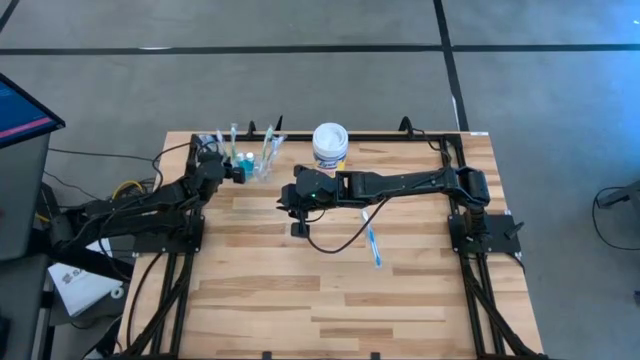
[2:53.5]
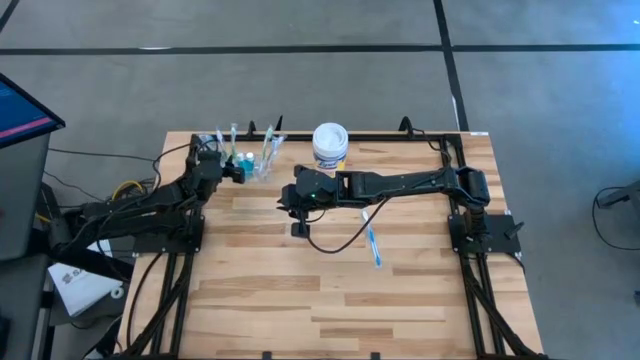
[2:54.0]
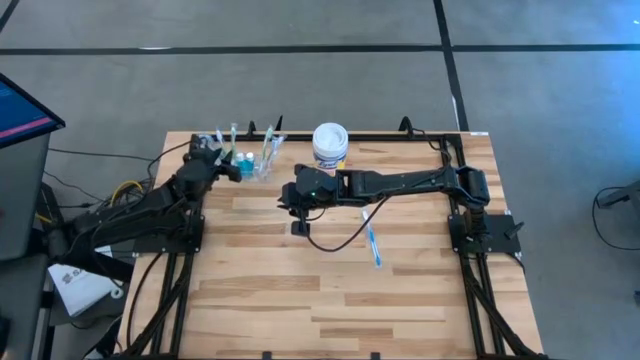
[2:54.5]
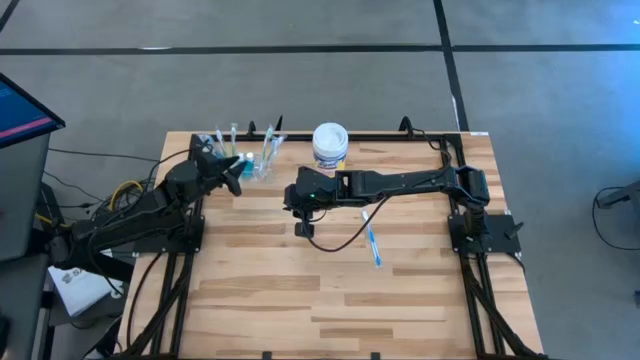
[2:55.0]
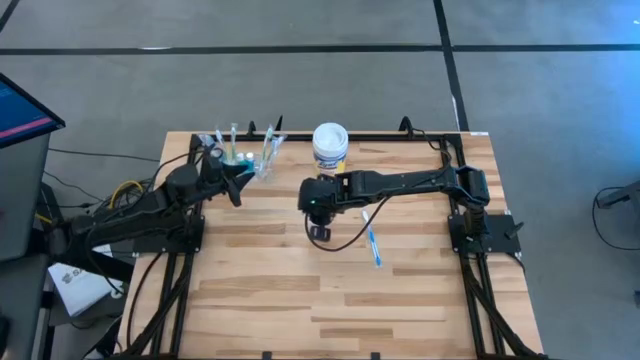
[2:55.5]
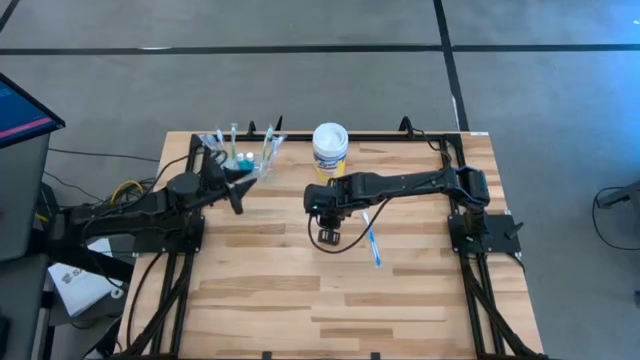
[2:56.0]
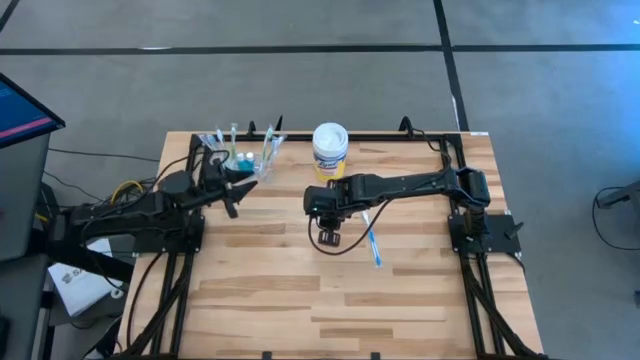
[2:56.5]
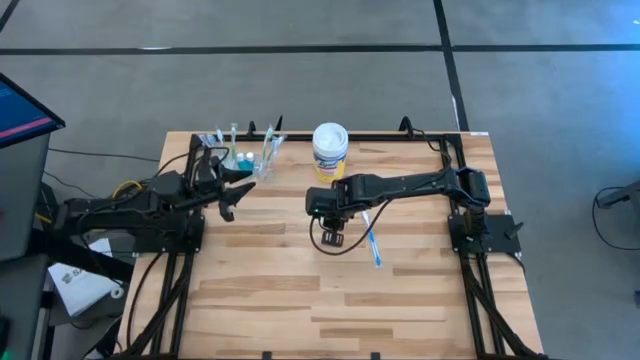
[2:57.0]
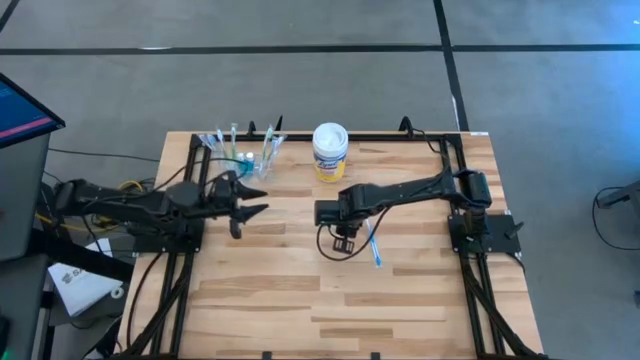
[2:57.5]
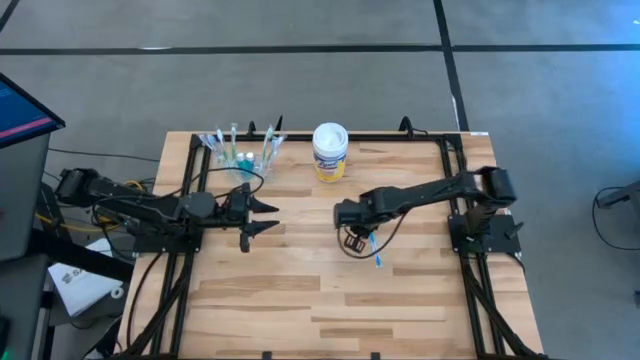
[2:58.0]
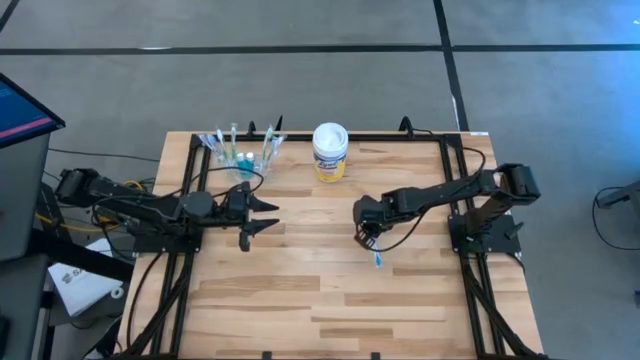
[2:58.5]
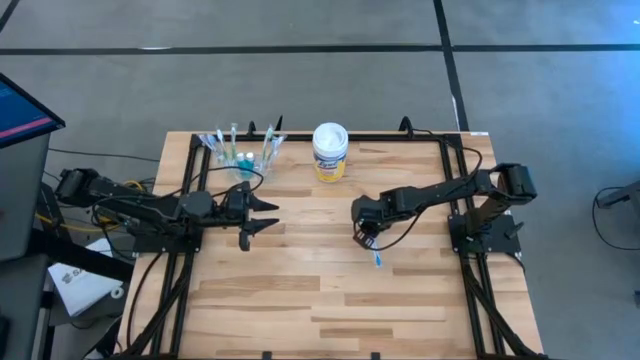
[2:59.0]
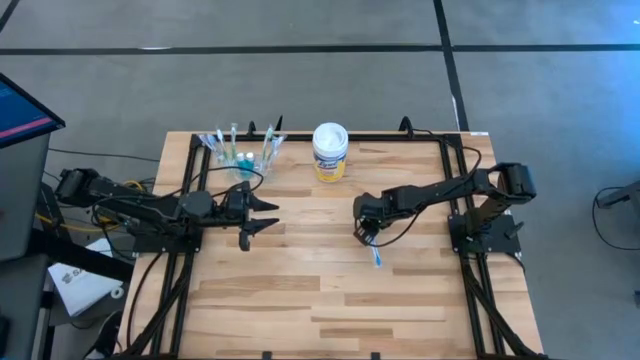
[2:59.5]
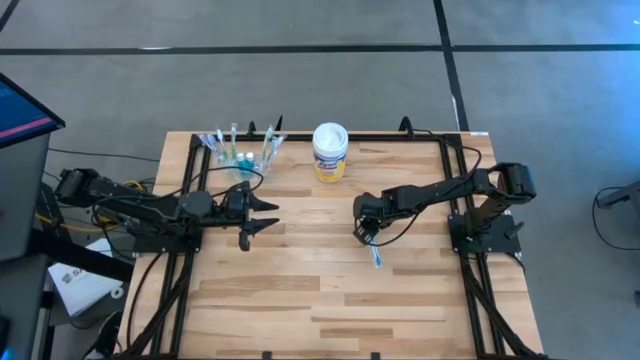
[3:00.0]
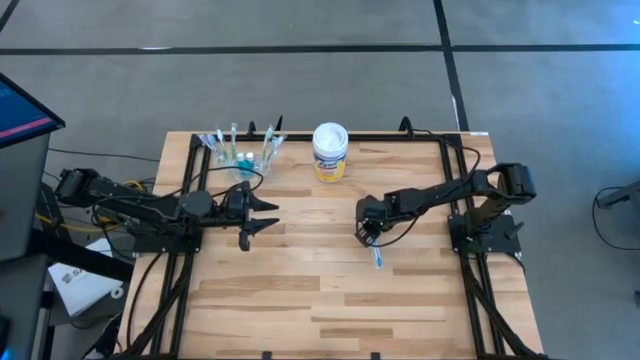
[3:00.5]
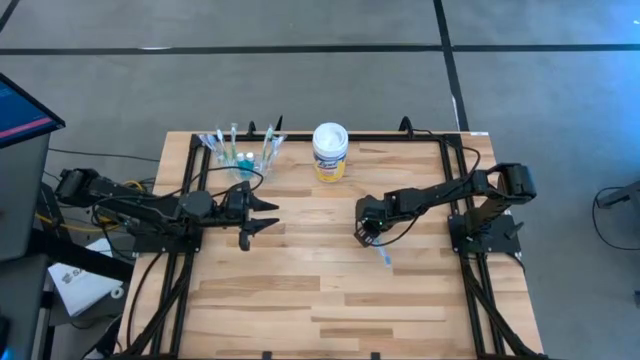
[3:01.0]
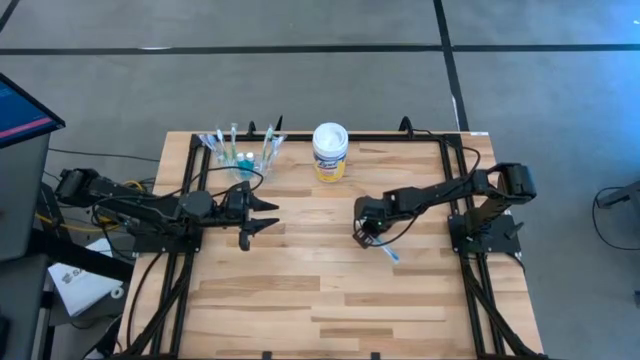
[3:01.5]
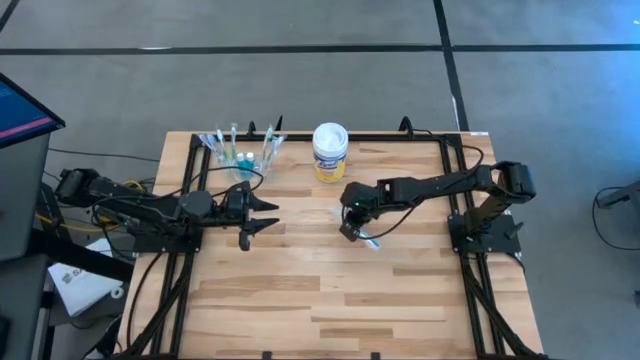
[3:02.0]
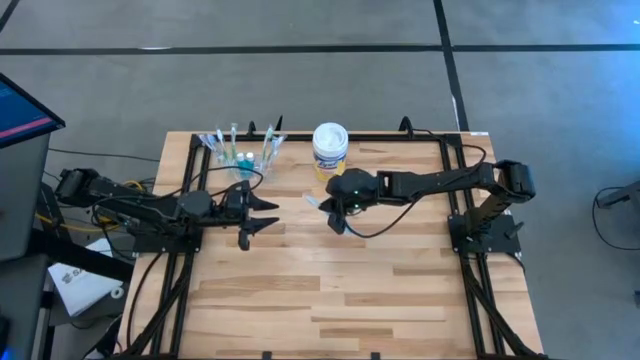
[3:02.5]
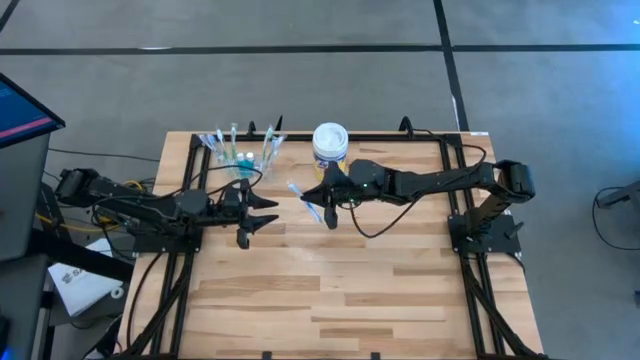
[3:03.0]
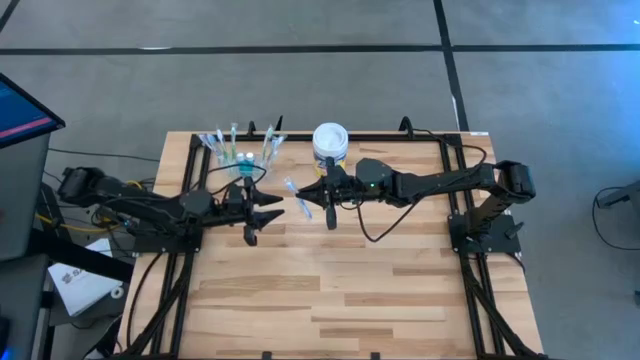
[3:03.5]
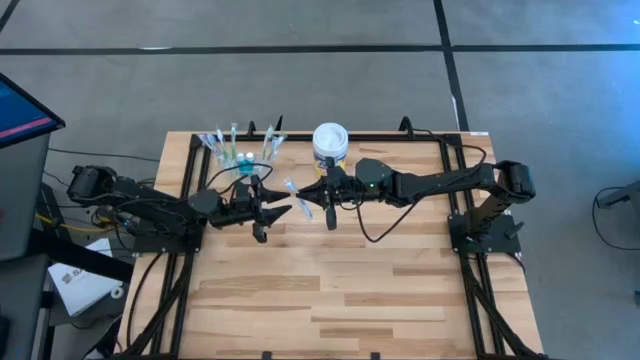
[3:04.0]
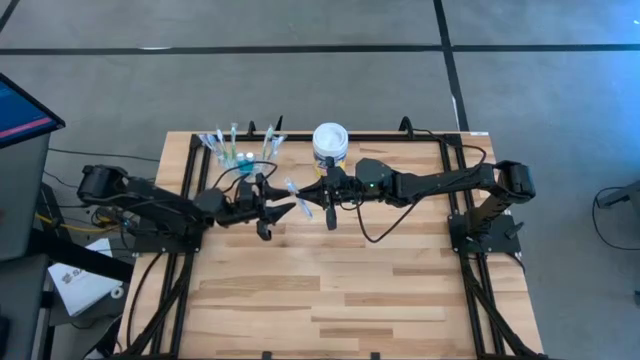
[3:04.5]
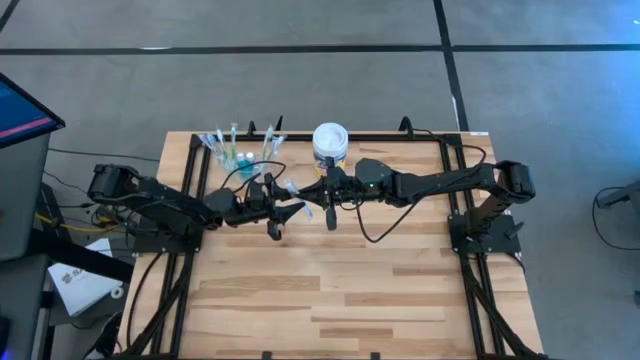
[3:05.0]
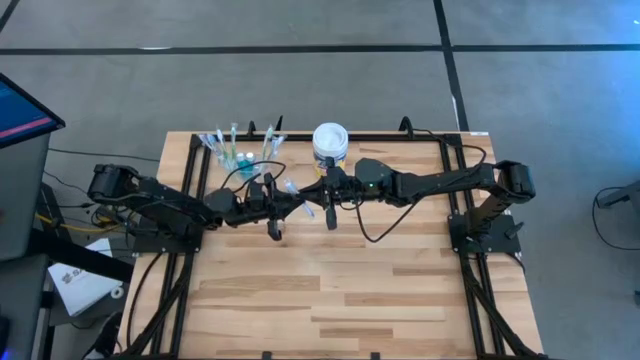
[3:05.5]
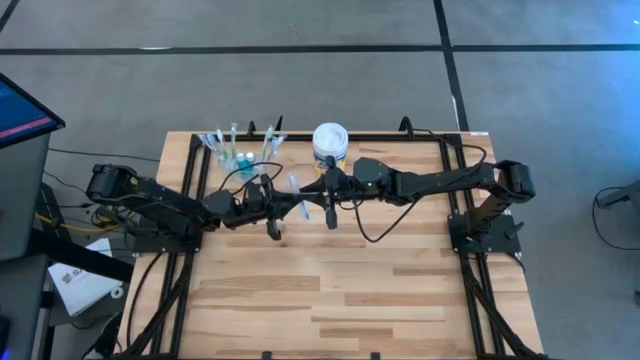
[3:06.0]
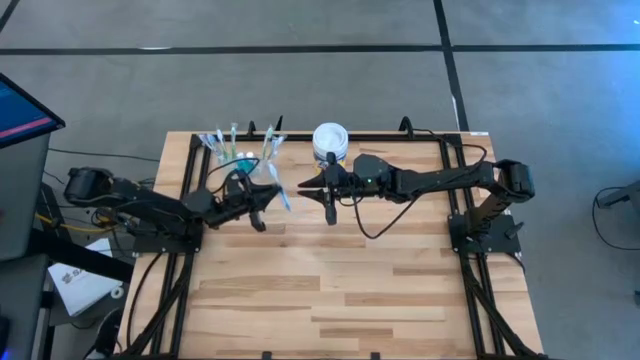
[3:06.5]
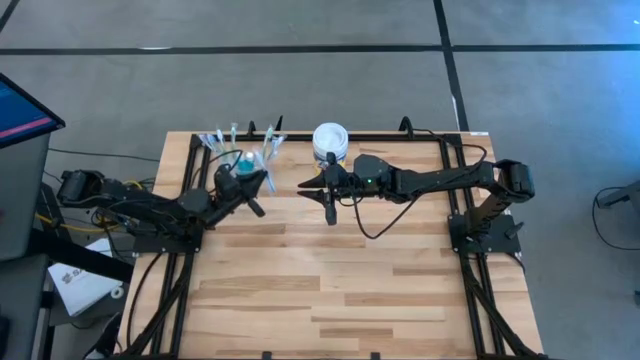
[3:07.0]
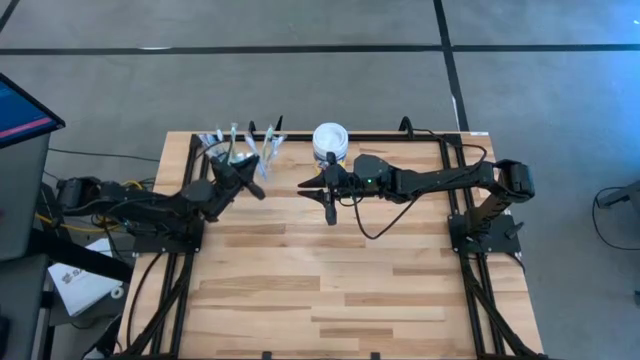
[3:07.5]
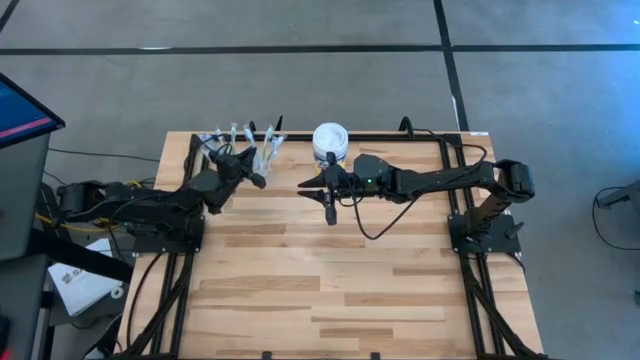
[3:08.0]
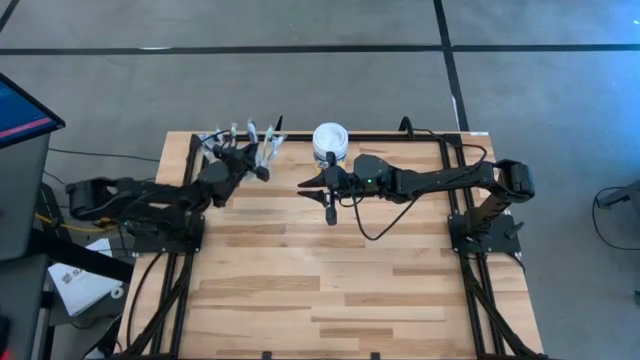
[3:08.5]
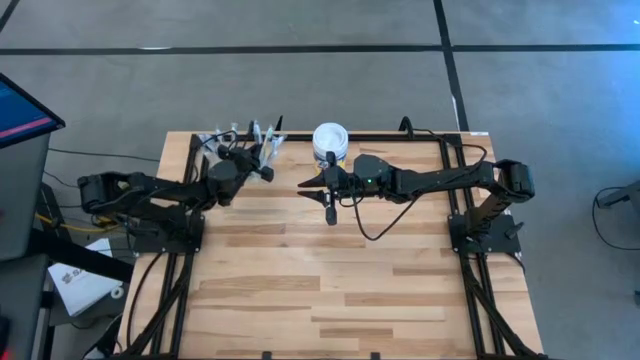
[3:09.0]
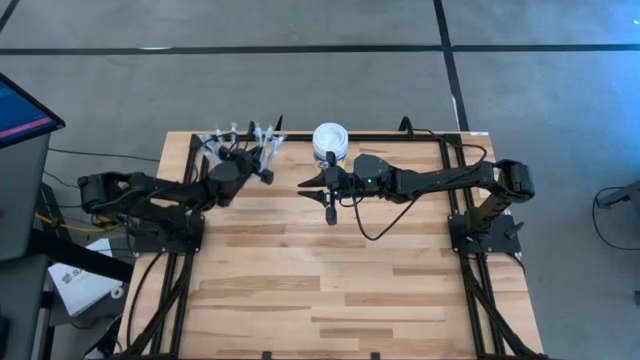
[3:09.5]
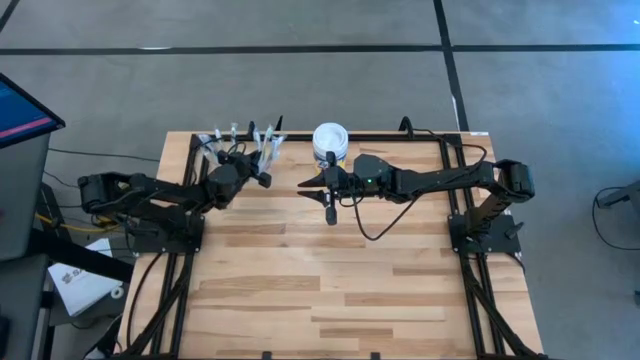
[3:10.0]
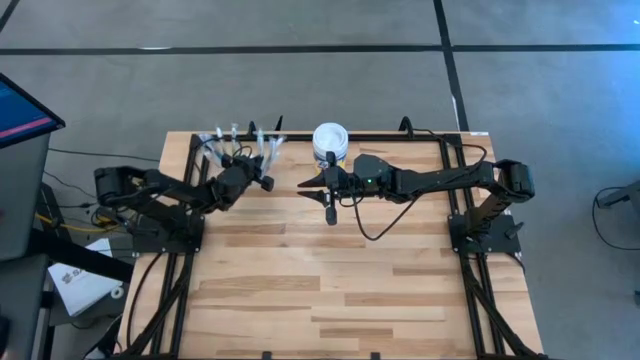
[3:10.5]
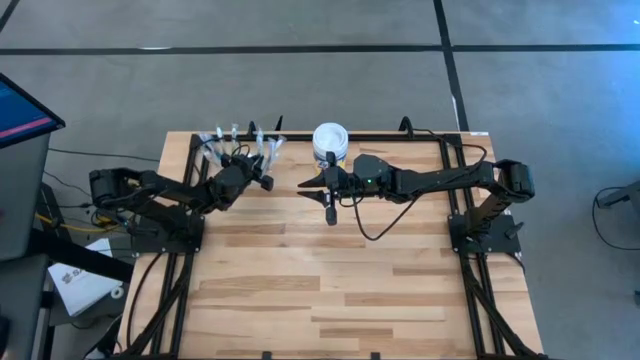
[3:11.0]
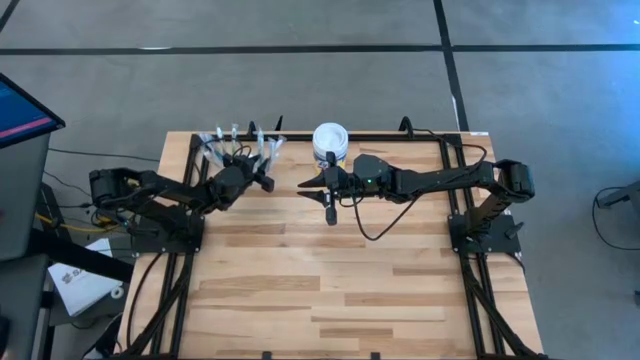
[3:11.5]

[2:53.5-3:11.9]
Task: Pick & Place toothbrushing station
Put the blue toothbrush into the transparent organizer

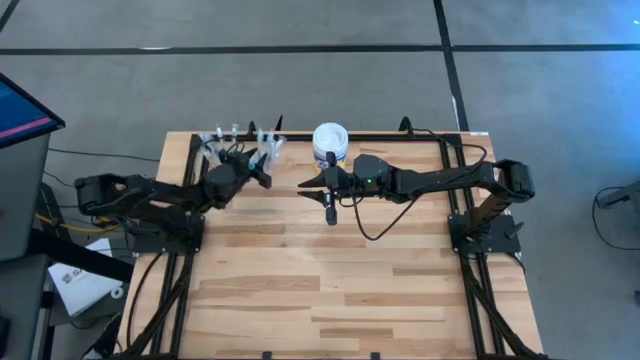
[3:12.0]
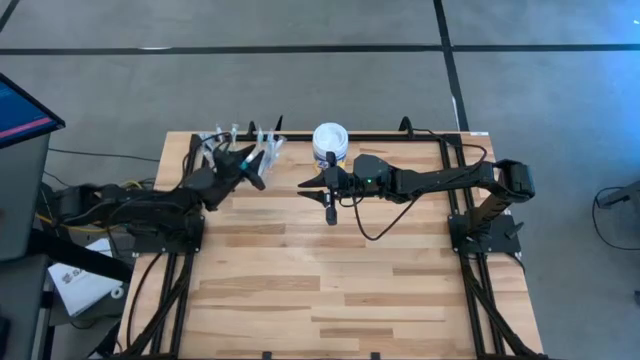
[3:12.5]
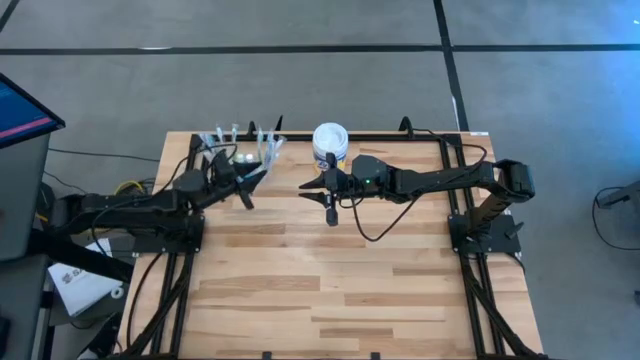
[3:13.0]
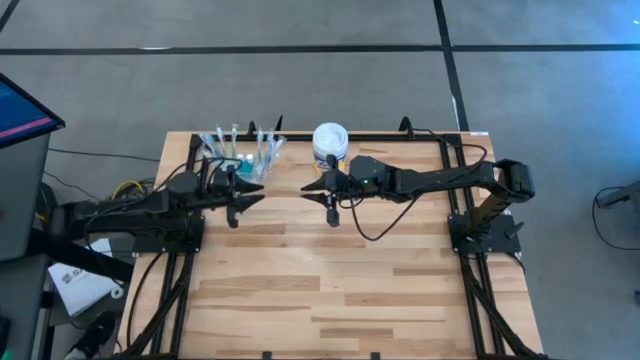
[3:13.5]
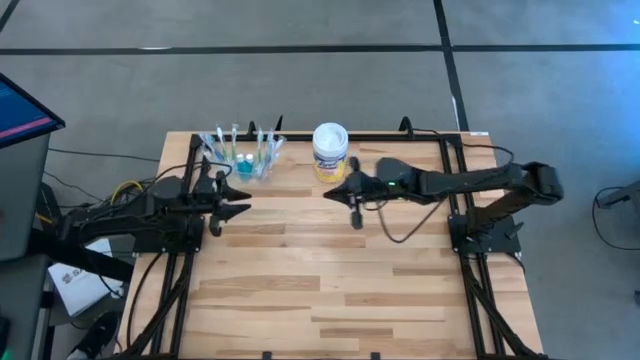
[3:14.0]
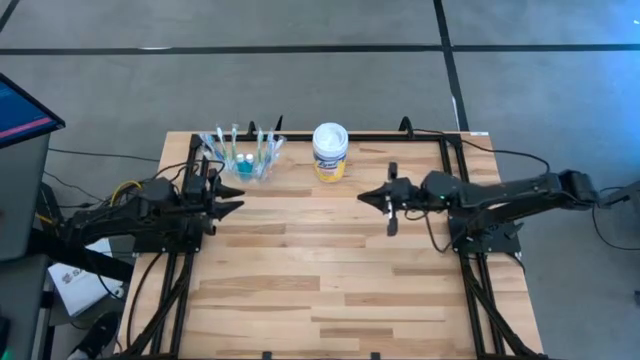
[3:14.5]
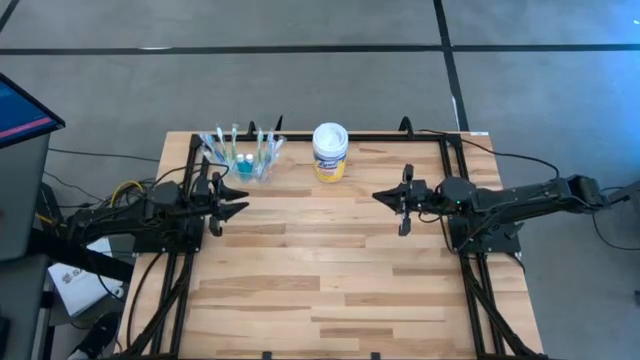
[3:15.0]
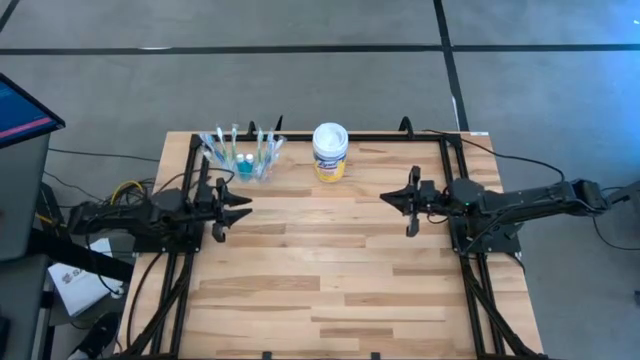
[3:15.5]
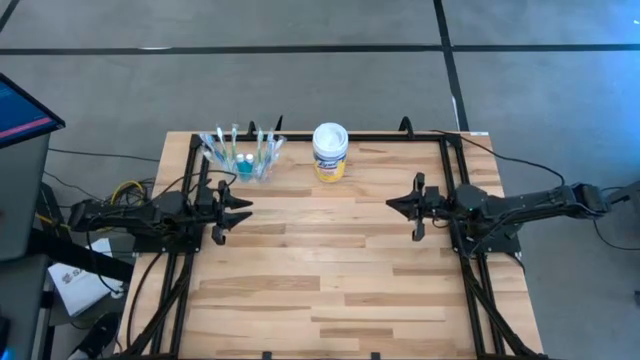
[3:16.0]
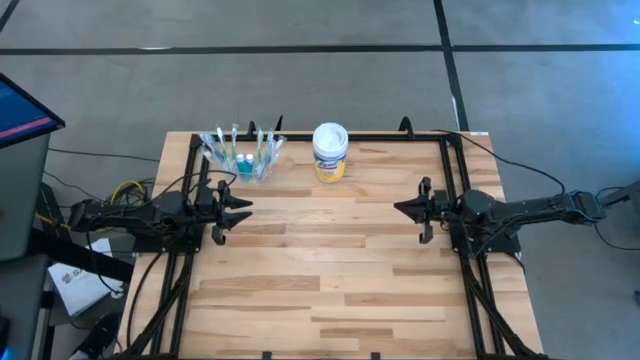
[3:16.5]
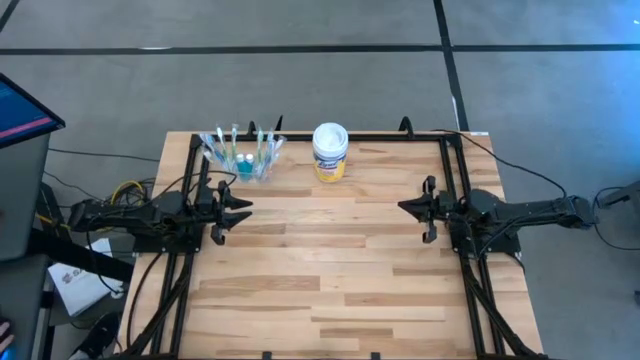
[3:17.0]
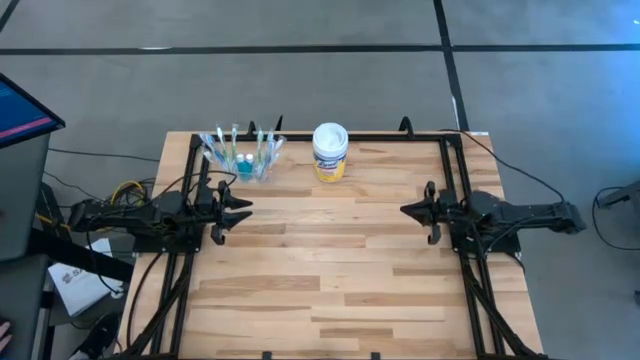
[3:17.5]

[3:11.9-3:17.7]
Return to Home Position
